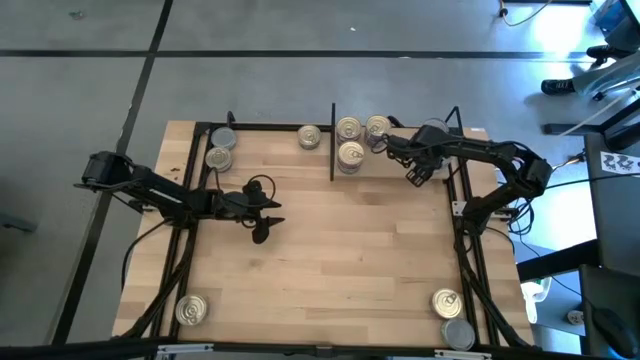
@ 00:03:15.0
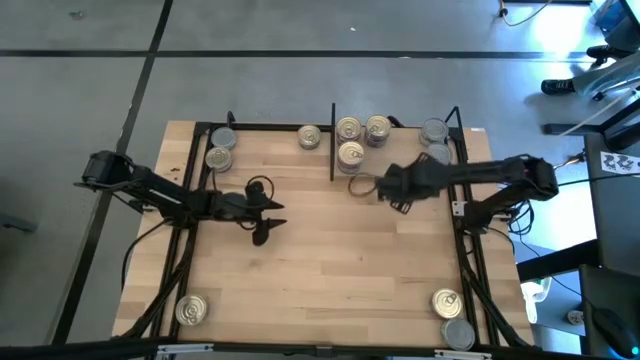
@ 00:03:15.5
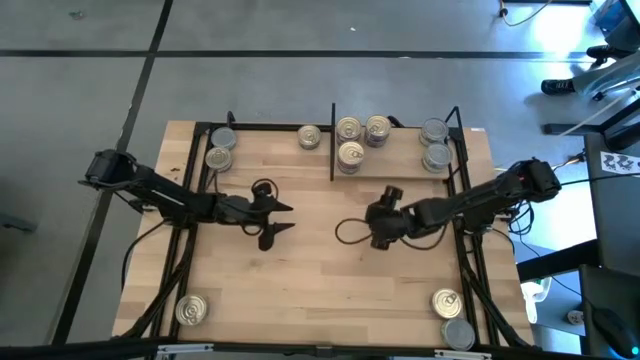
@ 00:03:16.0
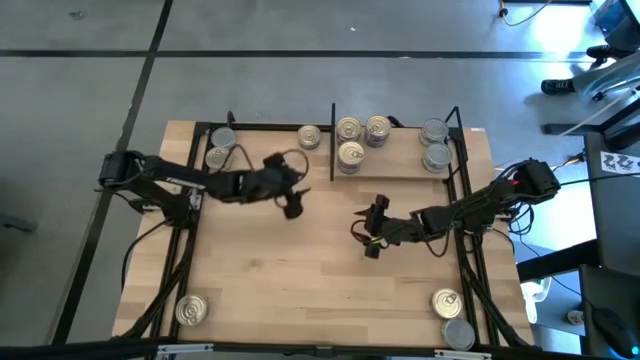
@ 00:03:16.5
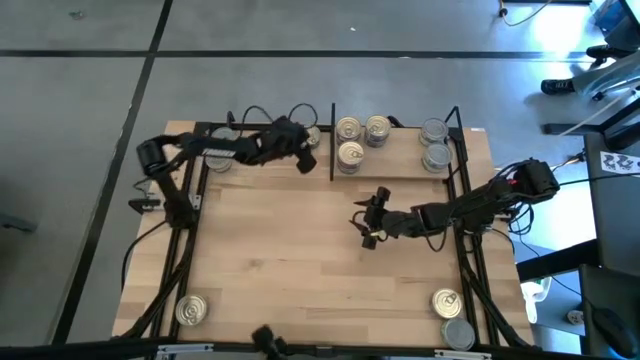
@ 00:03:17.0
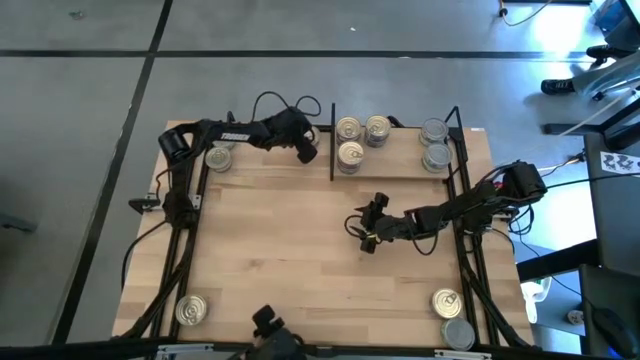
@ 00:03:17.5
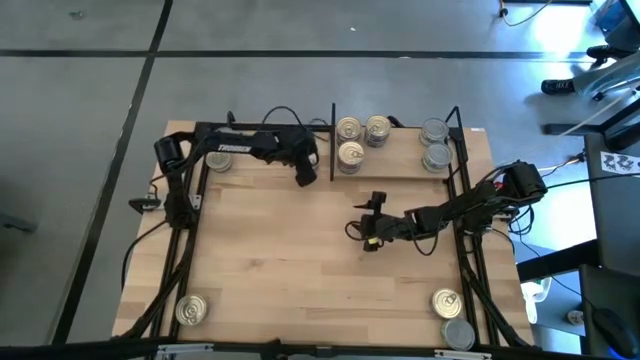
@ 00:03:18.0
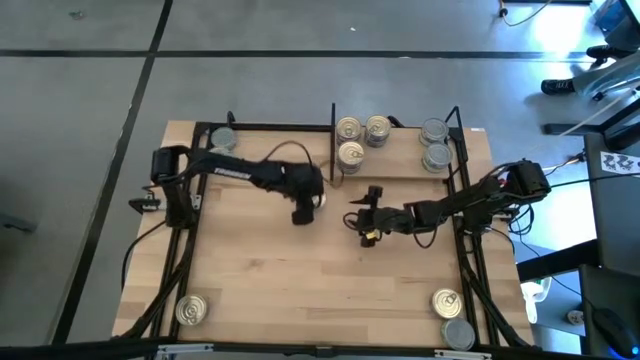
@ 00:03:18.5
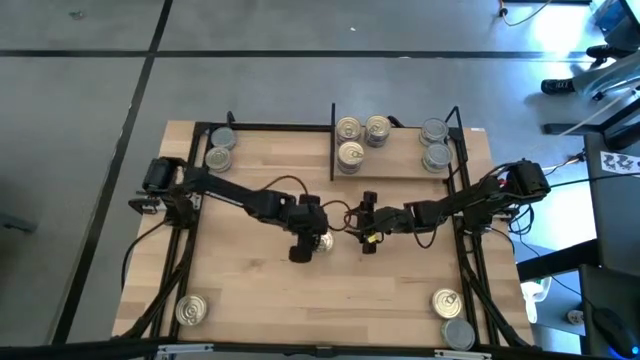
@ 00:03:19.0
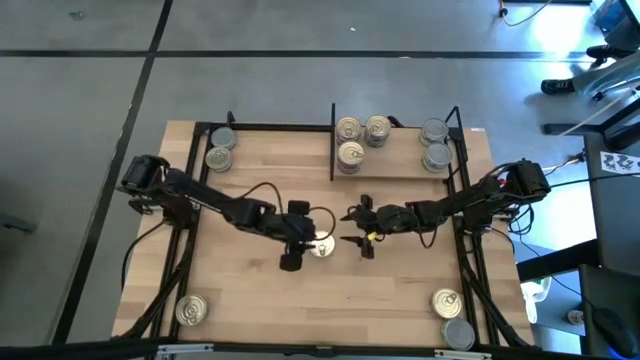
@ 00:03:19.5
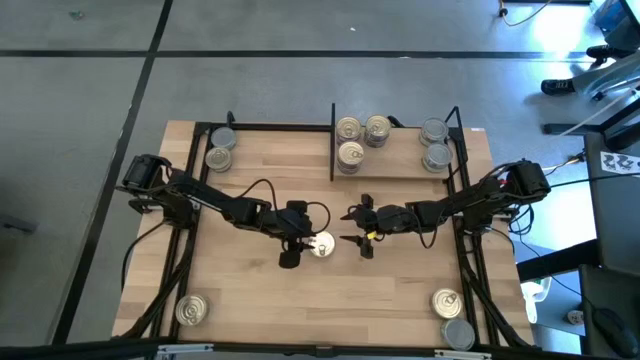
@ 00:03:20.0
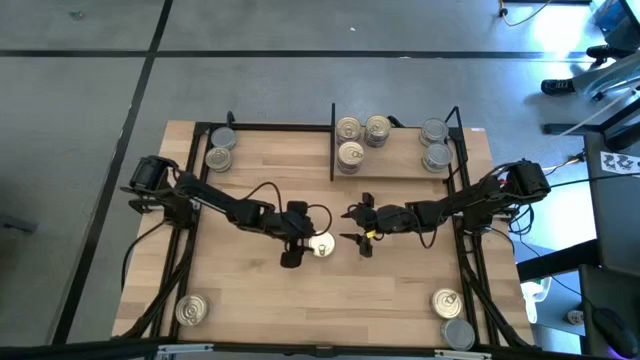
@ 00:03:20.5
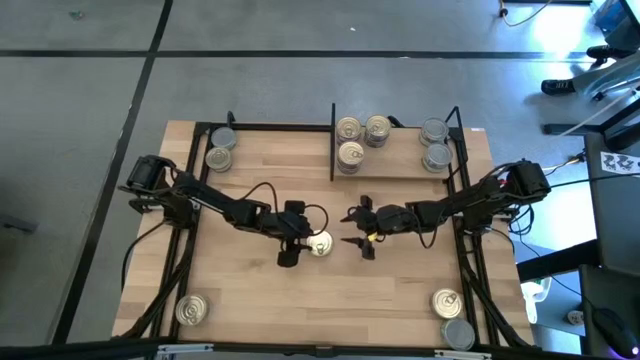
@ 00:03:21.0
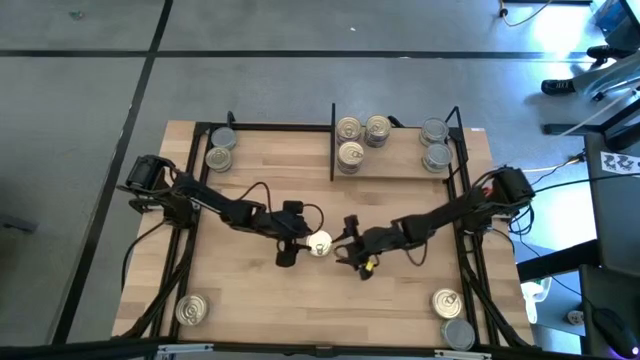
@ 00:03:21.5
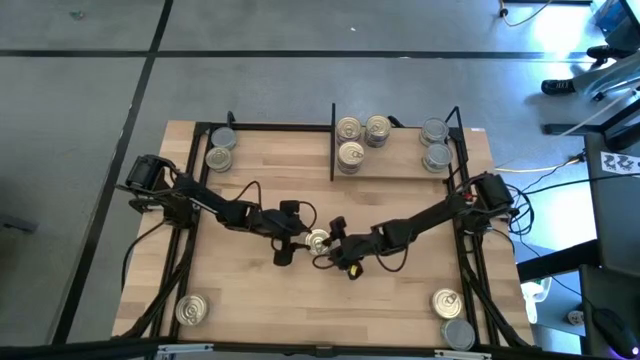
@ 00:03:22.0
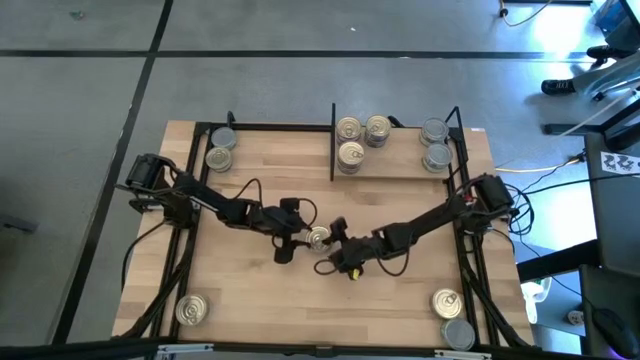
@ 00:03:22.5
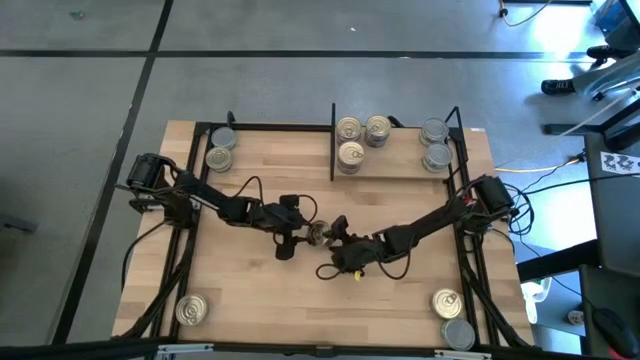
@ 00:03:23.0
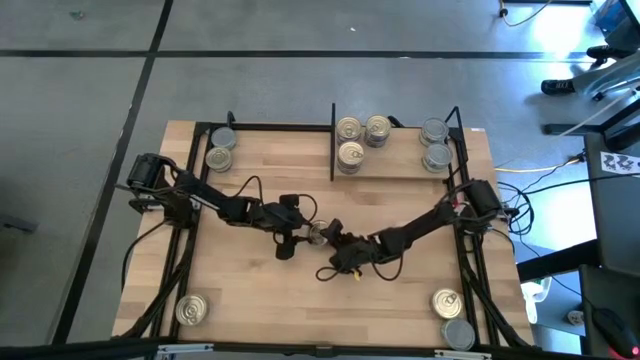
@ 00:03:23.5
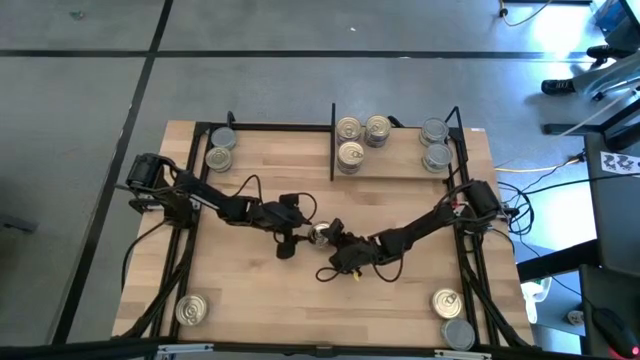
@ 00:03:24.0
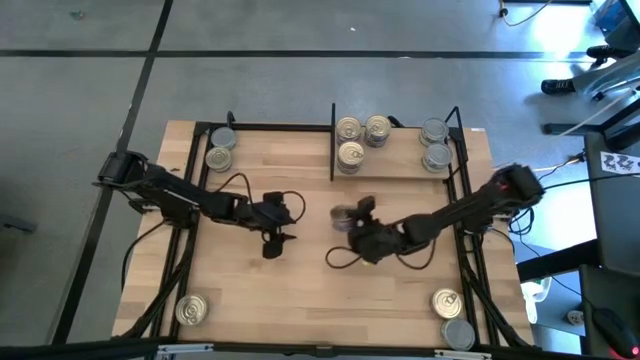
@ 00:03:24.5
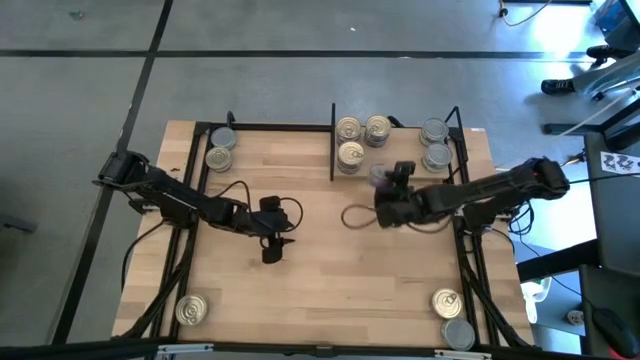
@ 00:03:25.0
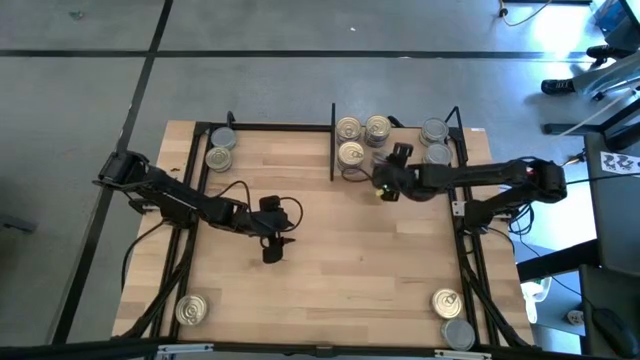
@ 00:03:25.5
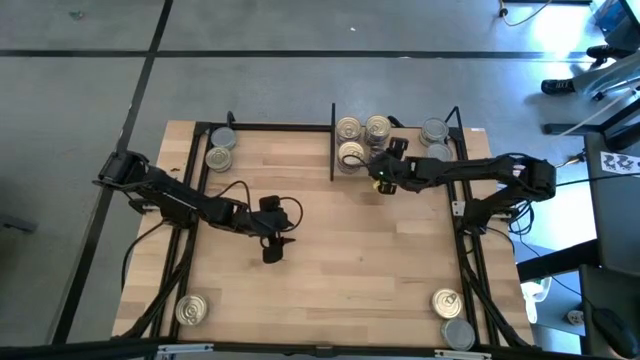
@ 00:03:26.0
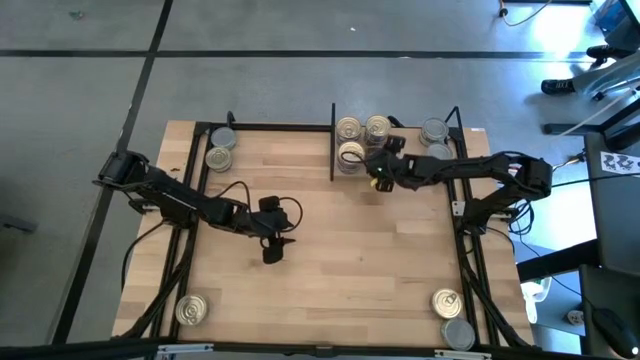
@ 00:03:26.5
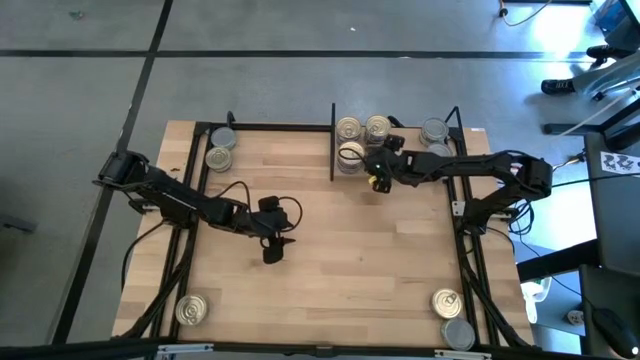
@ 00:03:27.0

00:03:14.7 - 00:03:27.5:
Task: Stack canned seafood by type on shelf
Put the blue tuna can into the shelf

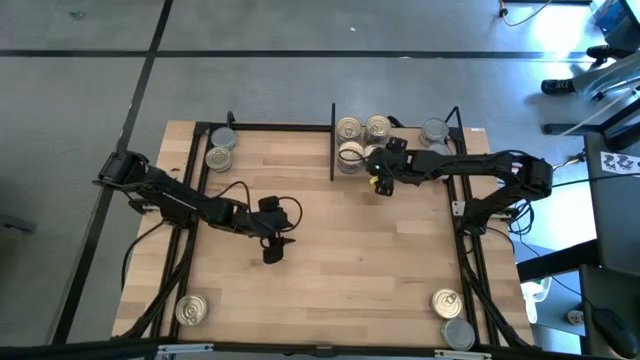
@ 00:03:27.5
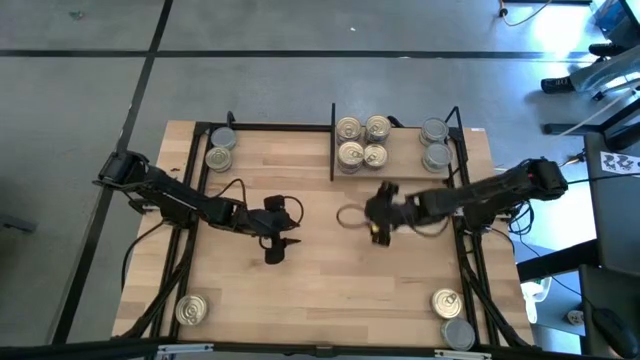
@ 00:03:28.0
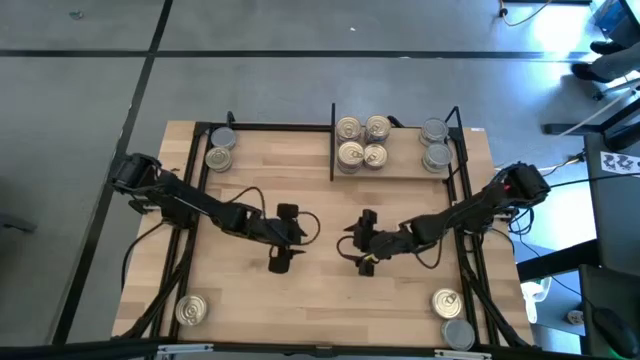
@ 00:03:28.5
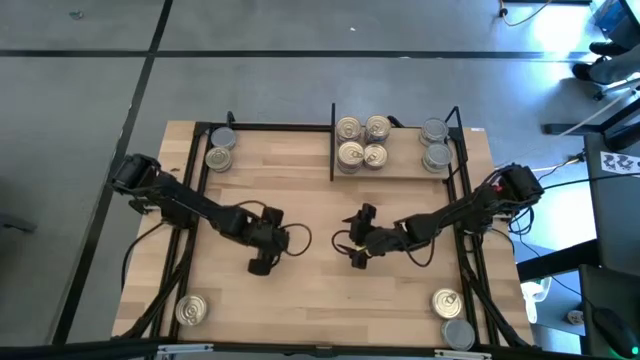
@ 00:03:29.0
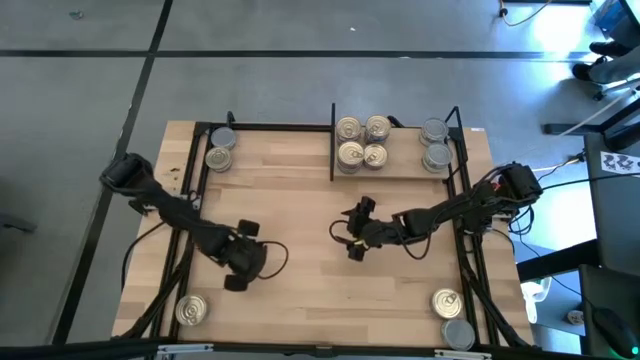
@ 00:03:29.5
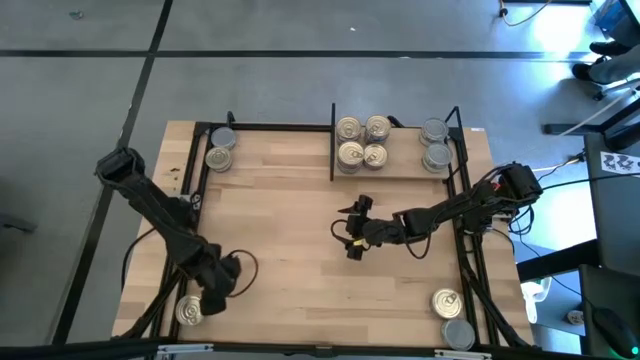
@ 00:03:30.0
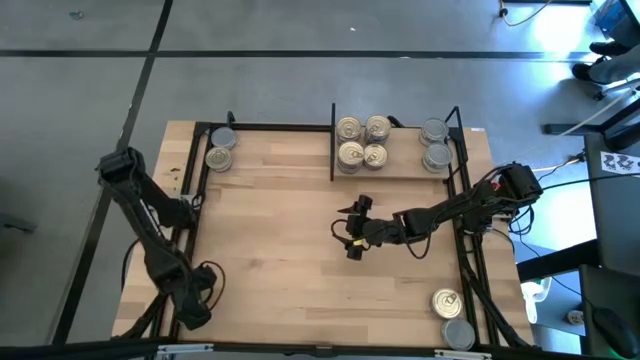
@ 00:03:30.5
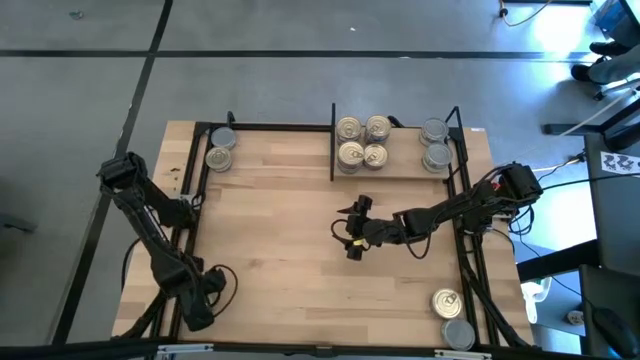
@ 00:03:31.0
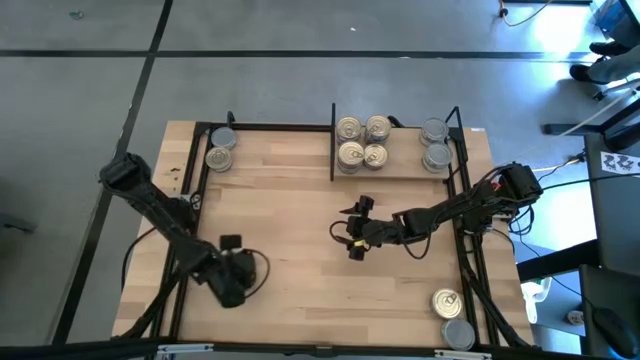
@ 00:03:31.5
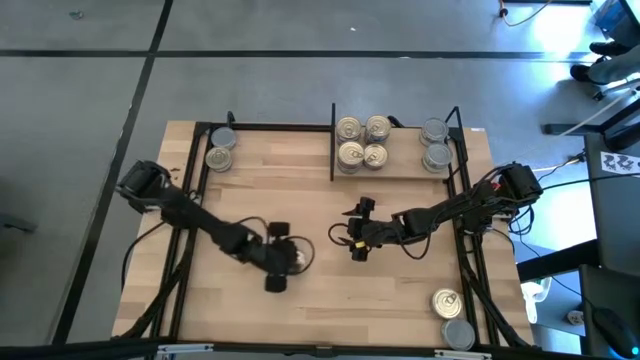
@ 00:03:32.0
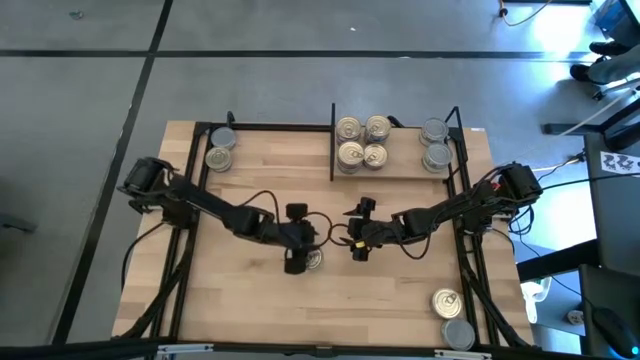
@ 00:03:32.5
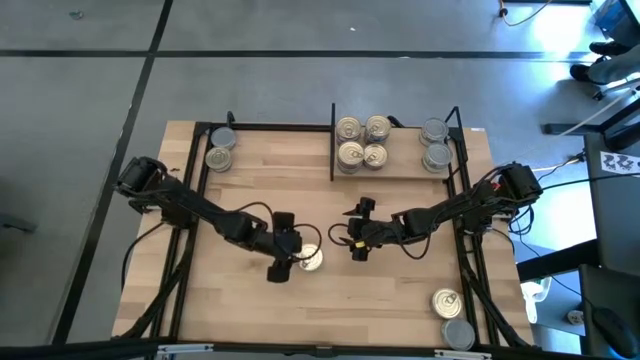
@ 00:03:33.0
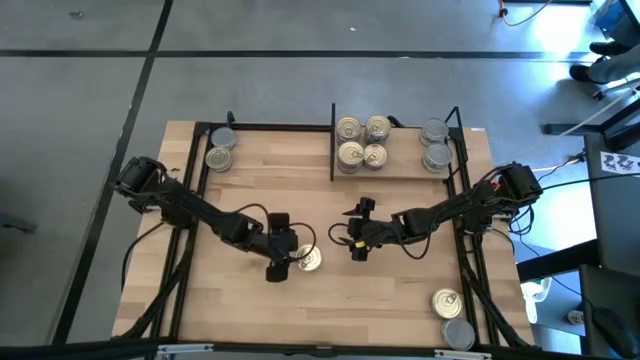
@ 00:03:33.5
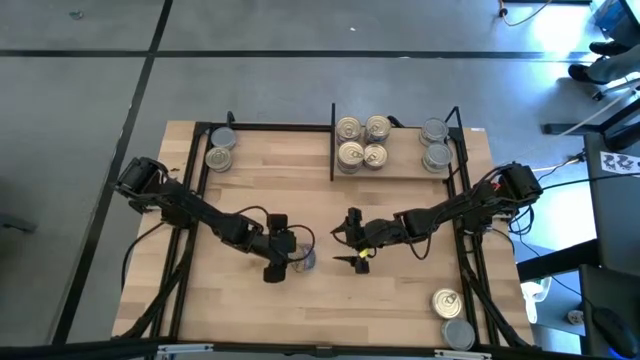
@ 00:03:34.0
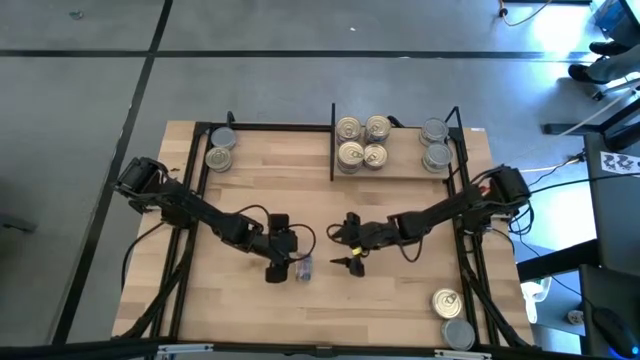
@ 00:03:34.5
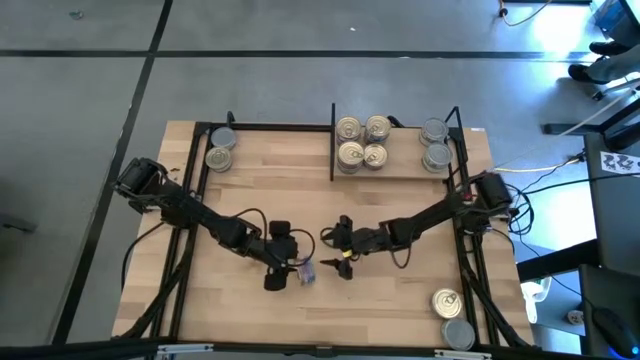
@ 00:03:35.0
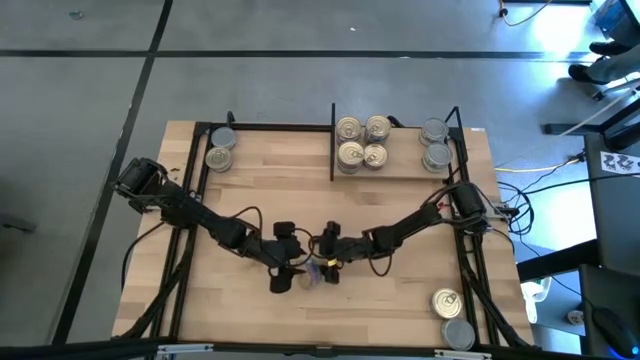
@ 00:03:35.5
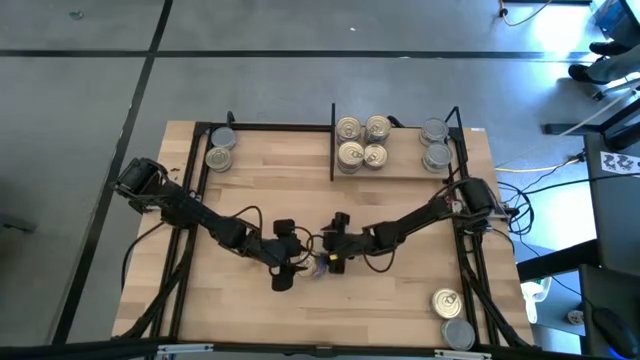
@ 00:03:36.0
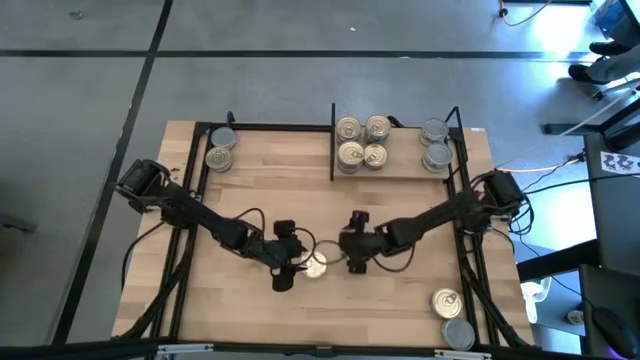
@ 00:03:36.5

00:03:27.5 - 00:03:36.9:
Stack the blue tuna can on top of the blue tuna can
